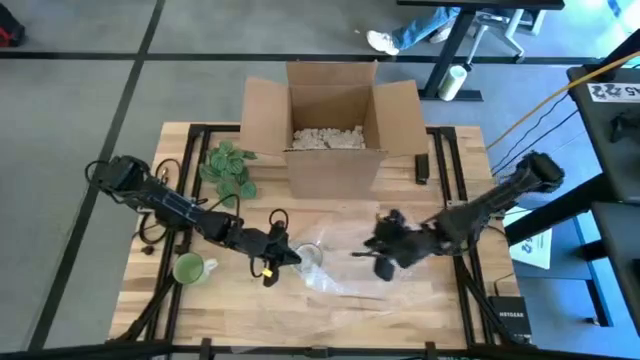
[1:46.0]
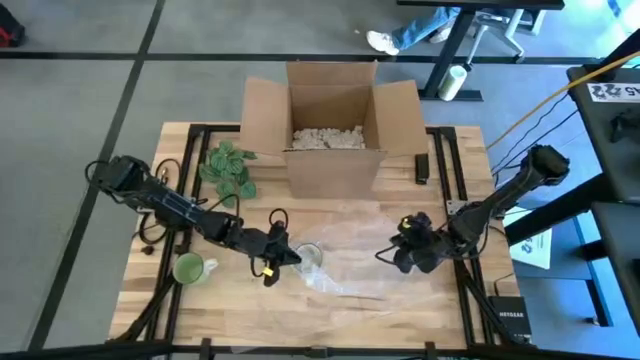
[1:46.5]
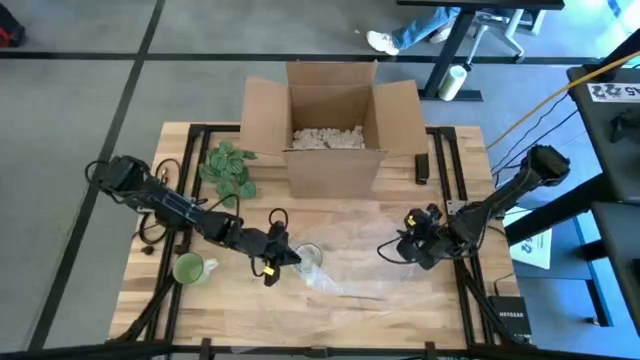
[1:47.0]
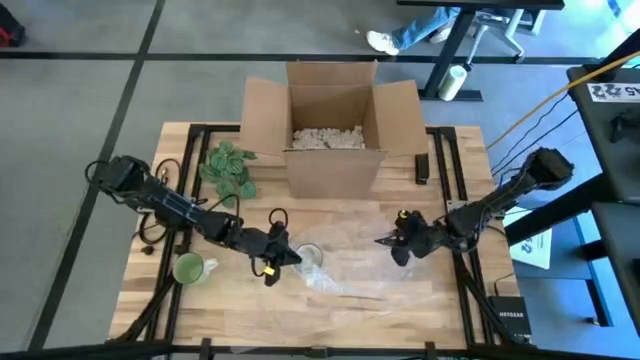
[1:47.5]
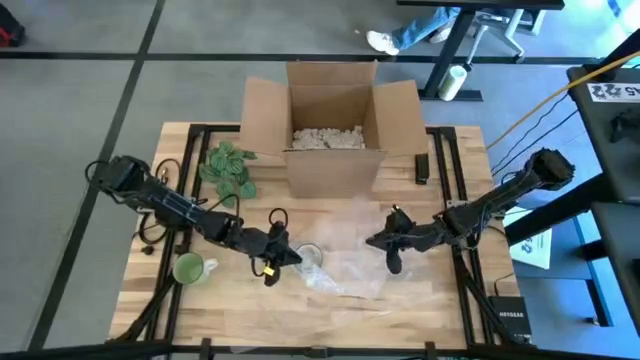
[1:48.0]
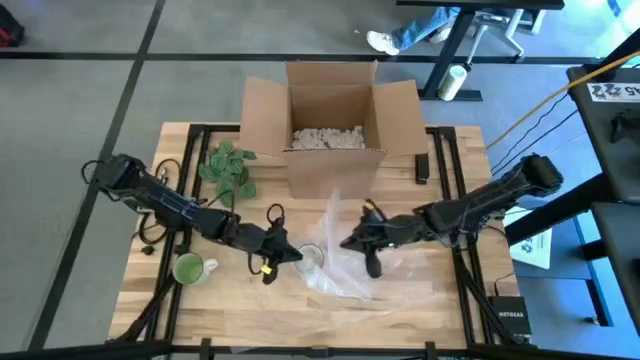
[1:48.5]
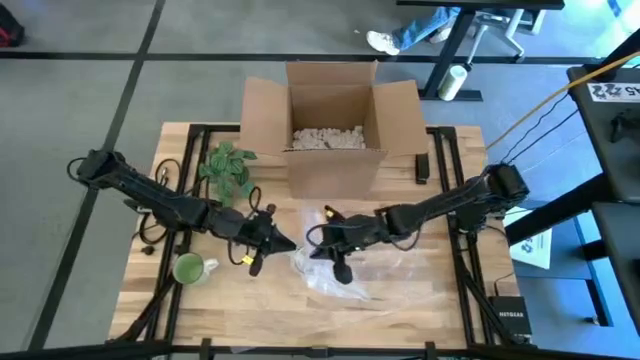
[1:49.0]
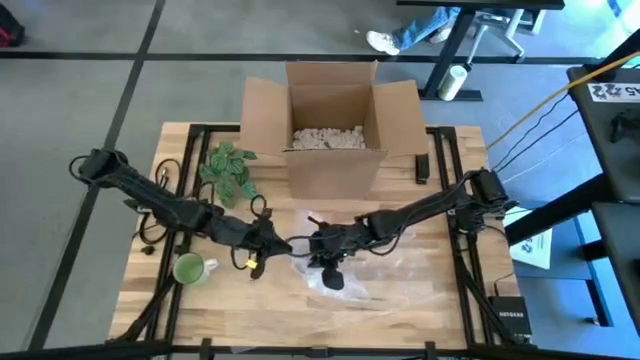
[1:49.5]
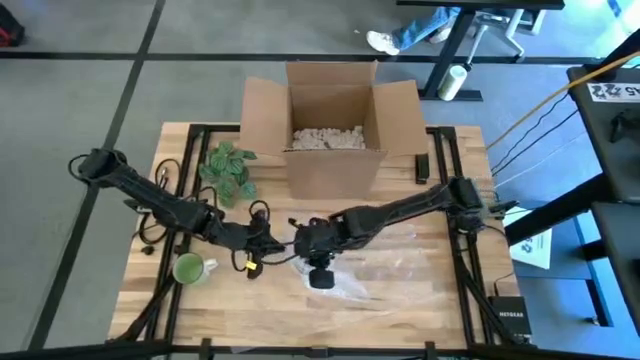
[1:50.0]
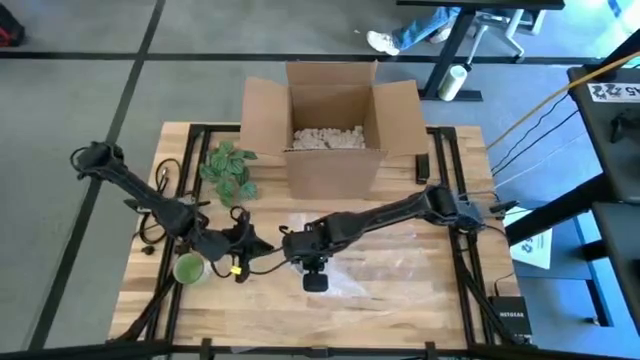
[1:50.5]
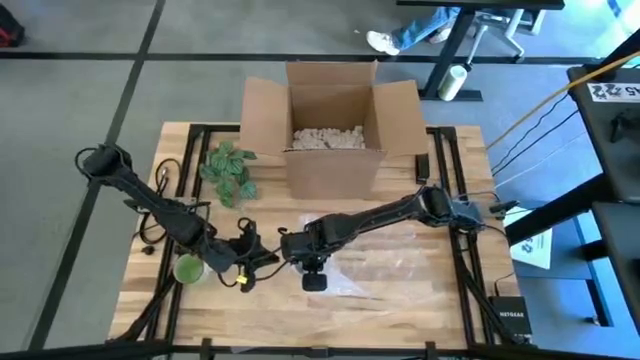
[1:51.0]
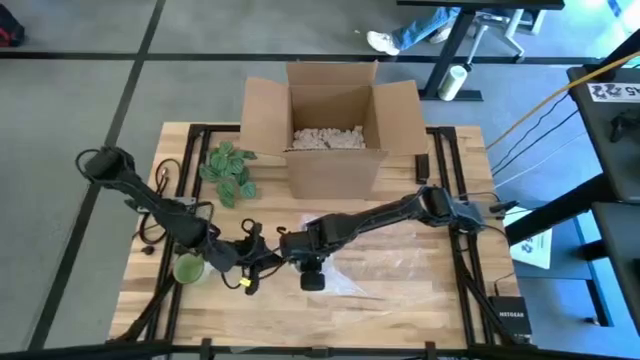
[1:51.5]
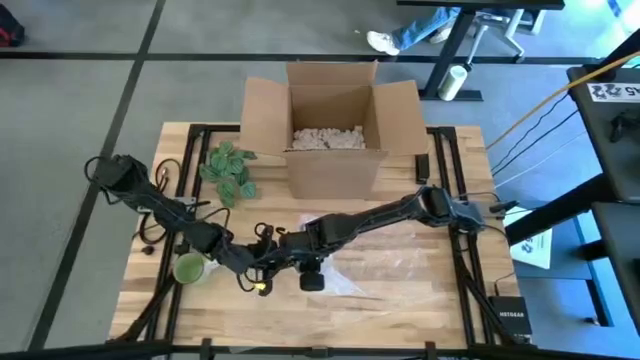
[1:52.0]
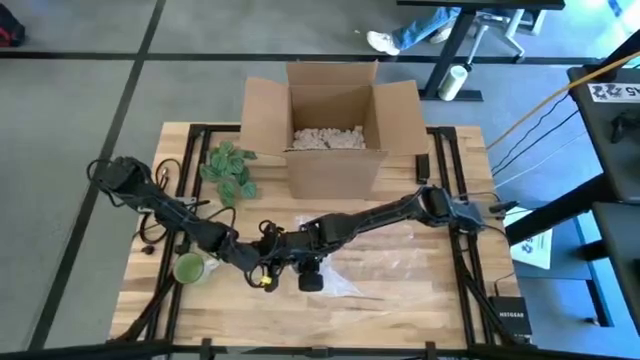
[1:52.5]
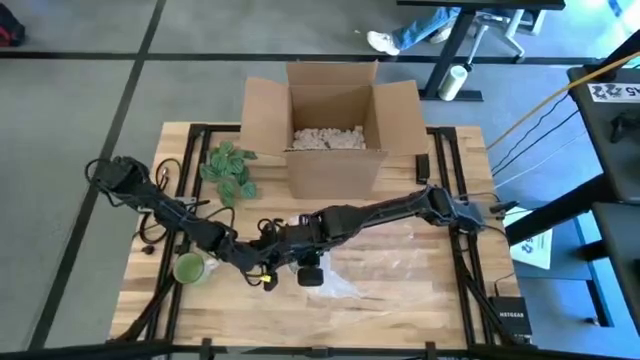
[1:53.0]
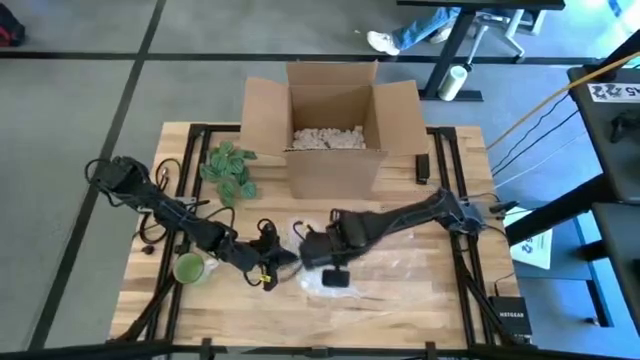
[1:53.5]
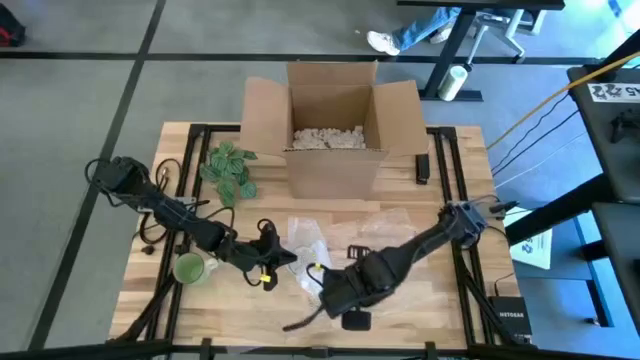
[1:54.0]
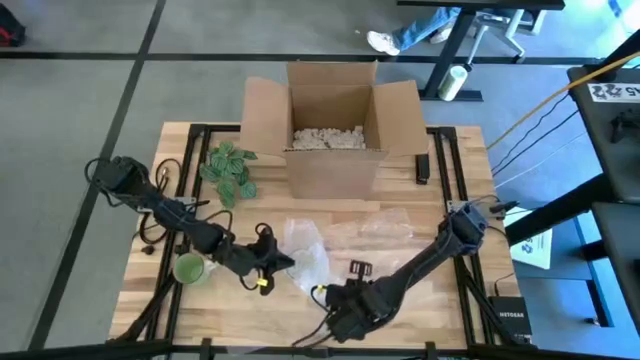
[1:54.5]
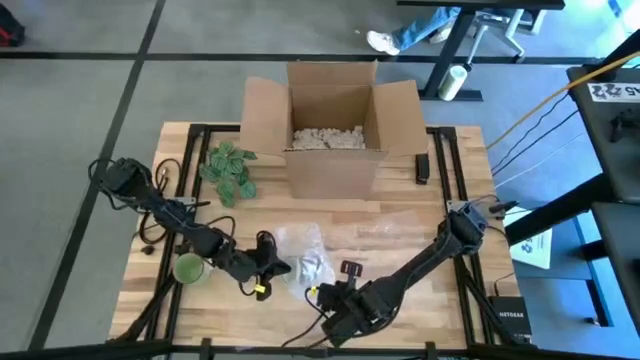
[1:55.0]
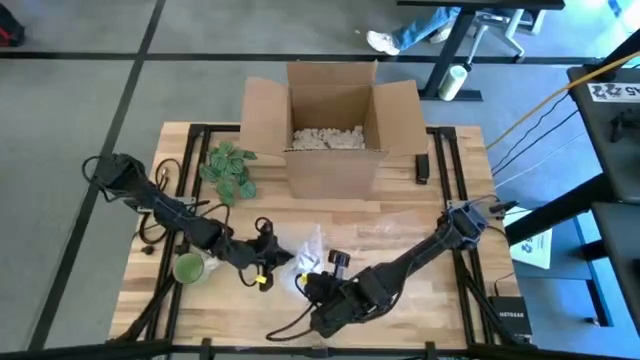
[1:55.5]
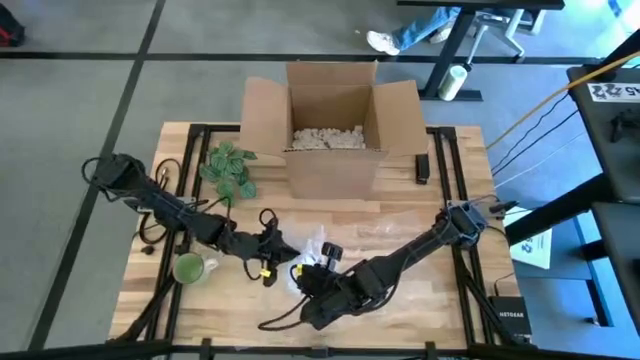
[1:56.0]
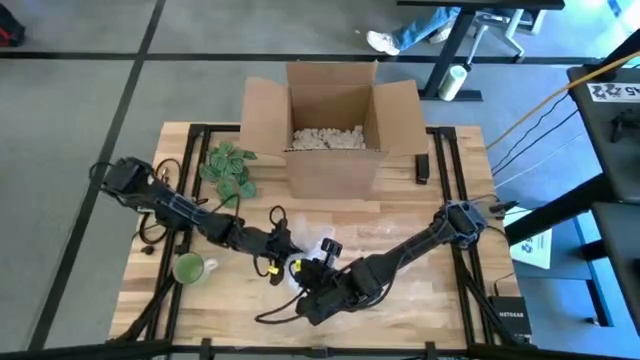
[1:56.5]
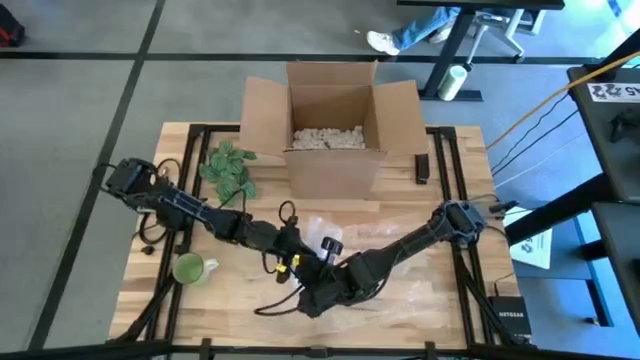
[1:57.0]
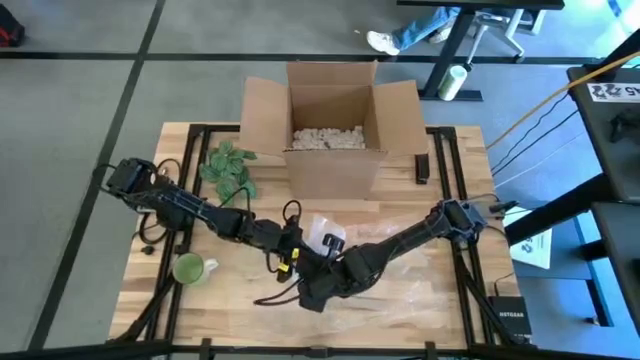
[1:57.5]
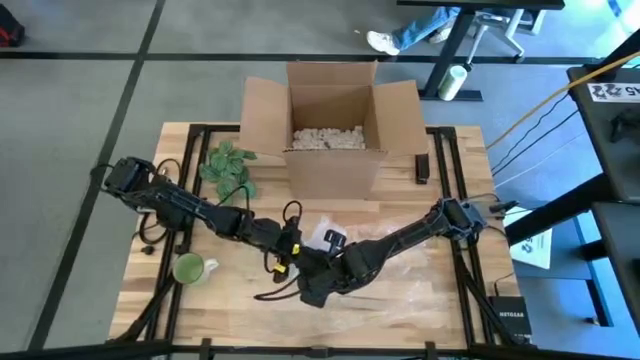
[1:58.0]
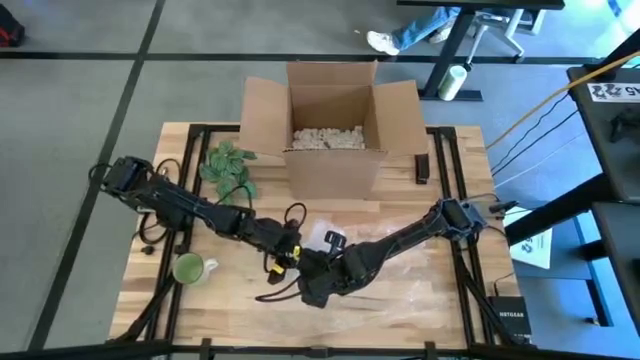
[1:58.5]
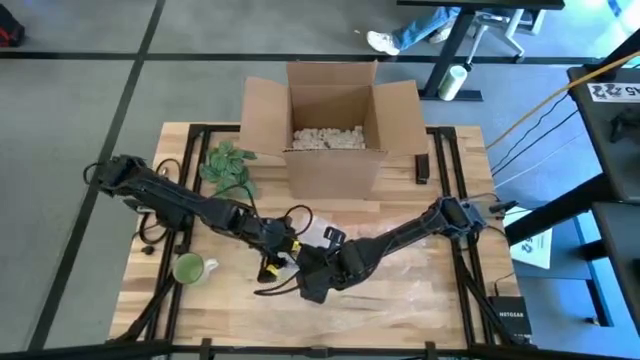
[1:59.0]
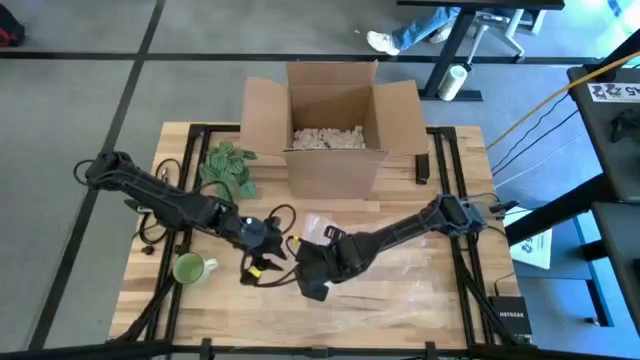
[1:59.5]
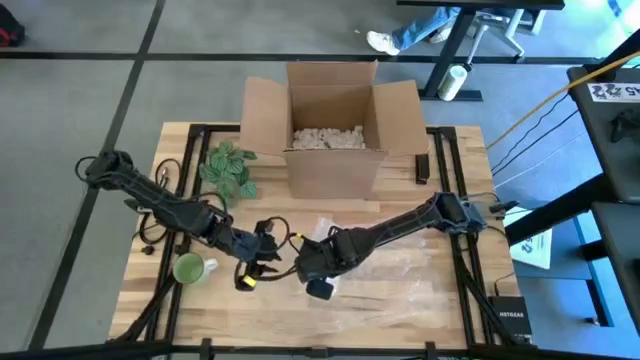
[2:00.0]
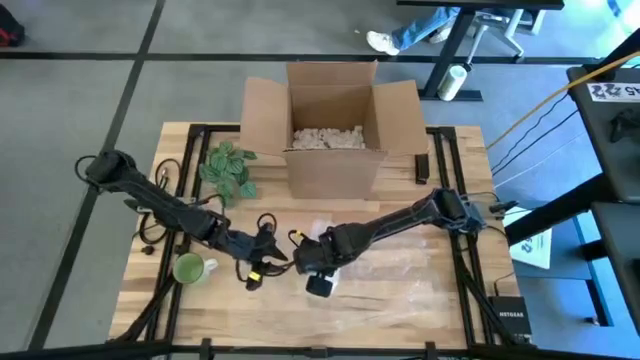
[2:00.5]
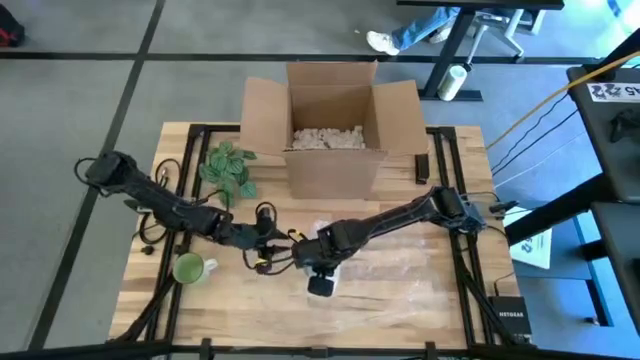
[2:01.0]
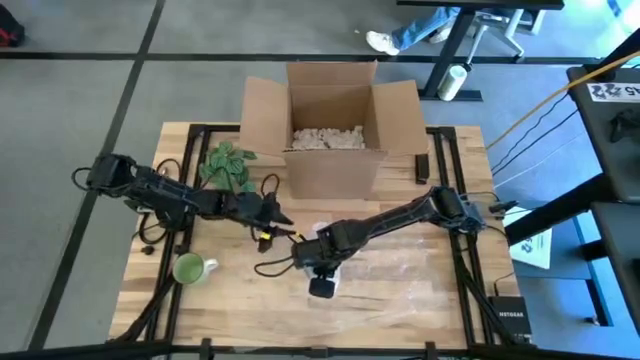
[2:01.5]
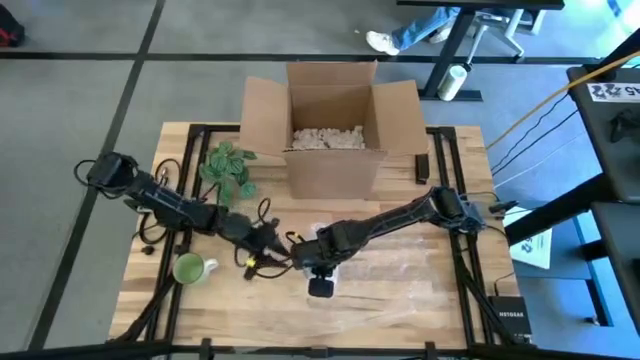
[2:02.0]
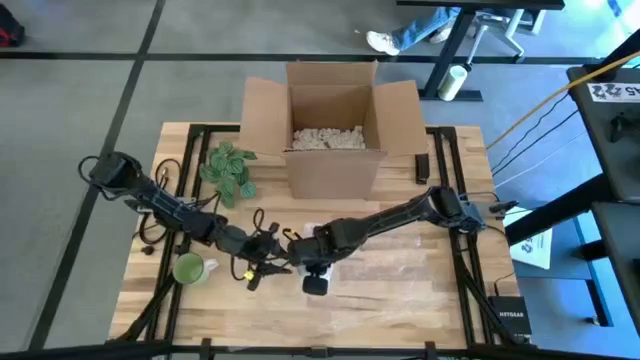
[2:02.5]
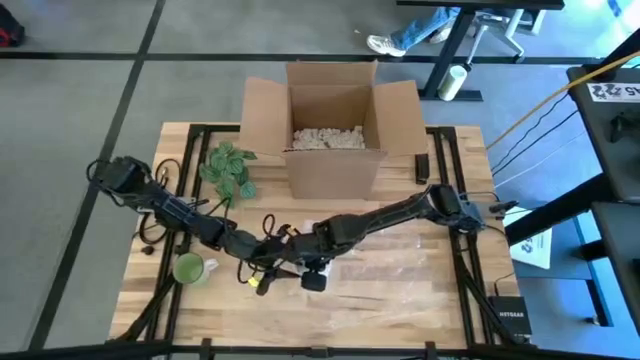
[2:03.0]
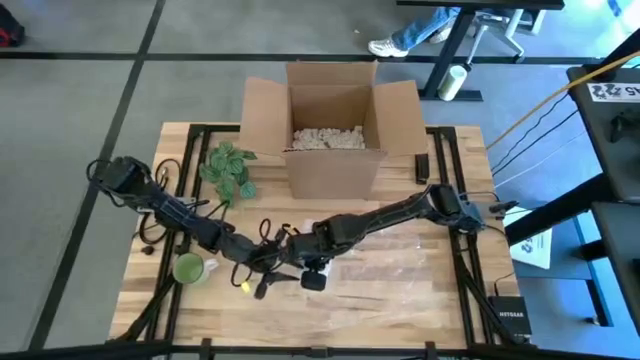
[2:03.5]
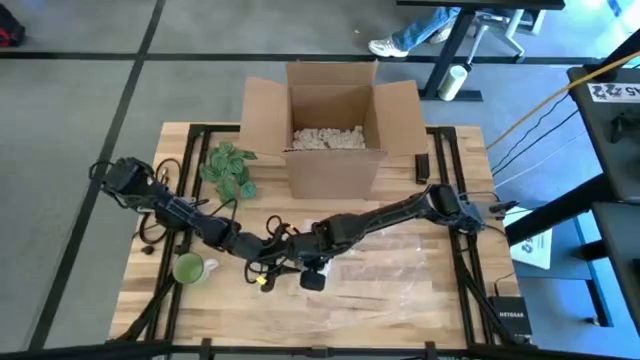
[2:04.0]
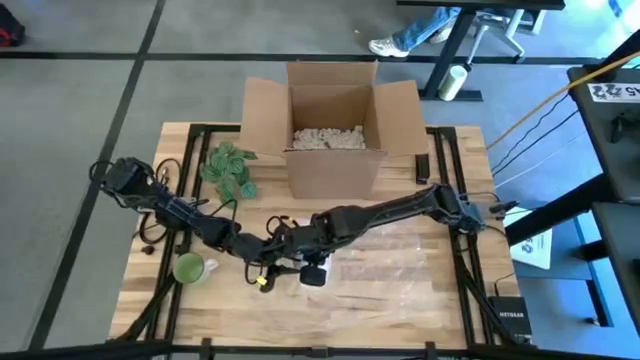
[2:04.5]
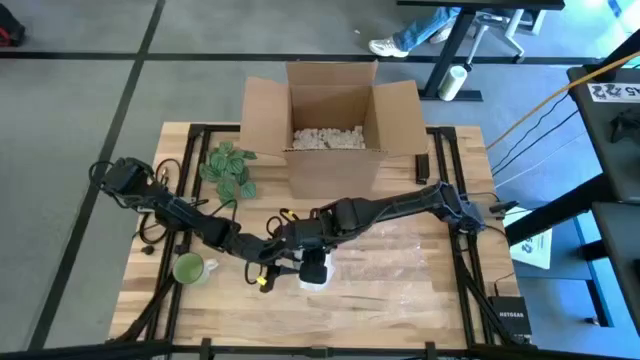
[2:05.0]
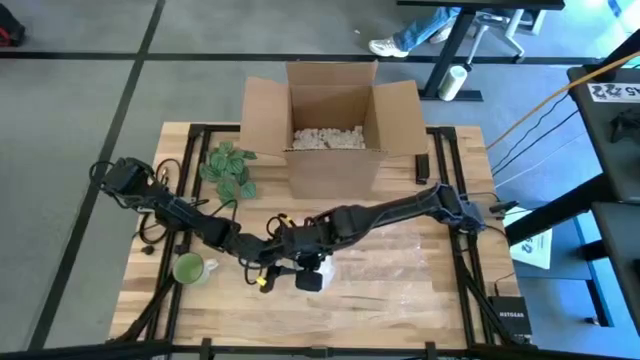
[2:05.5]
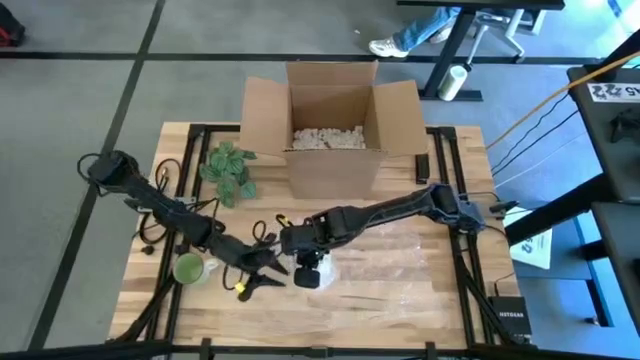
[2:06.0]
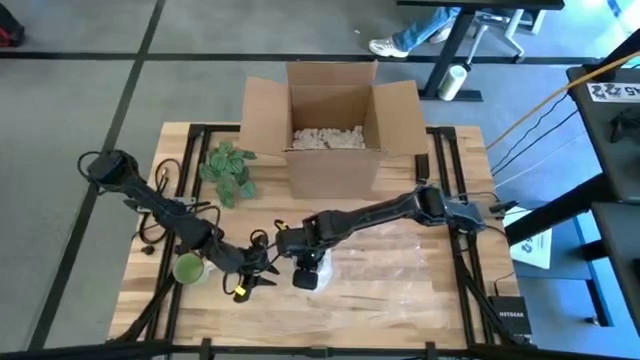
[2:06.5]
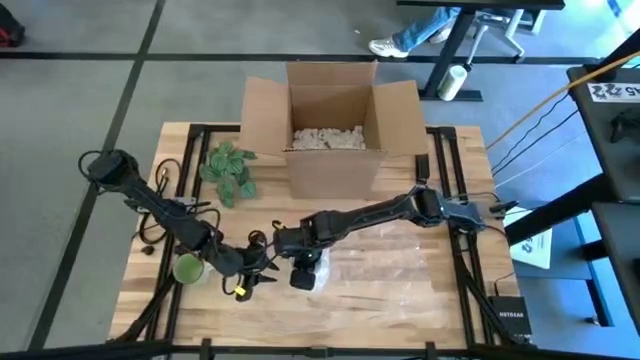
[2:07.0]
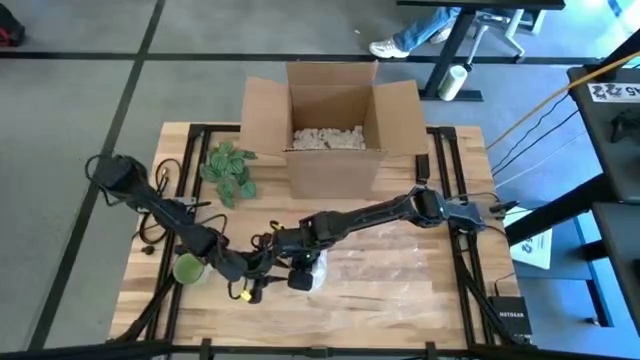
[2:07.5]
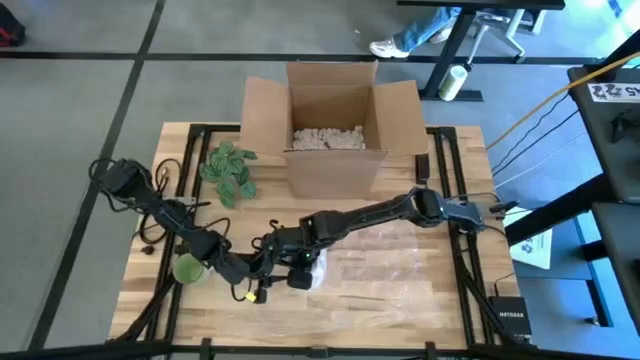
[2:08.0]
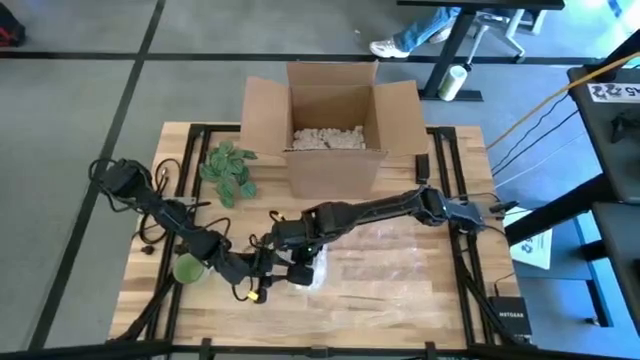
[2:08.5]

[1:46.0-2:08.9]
Task: wrap mug
Wrap the blue mug in bubble wrap
